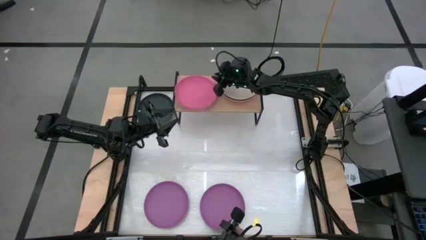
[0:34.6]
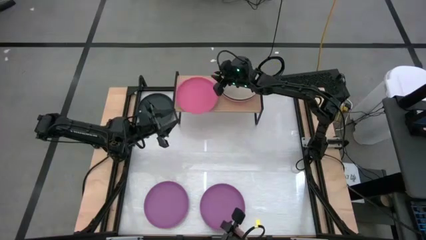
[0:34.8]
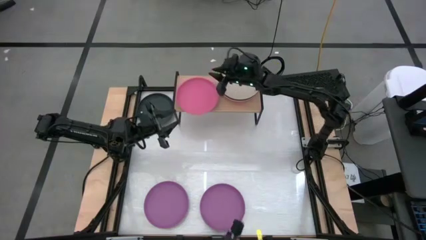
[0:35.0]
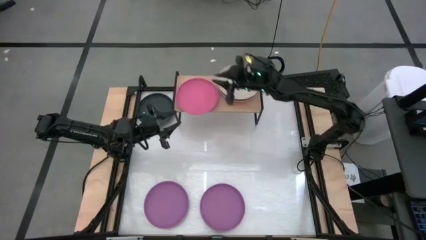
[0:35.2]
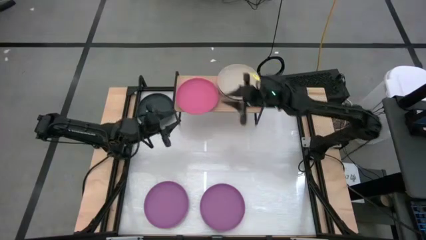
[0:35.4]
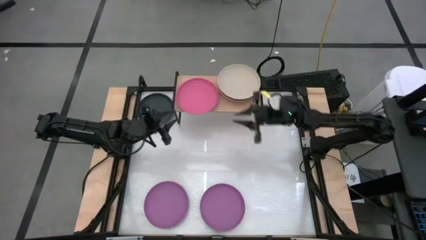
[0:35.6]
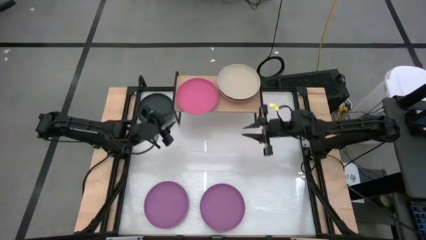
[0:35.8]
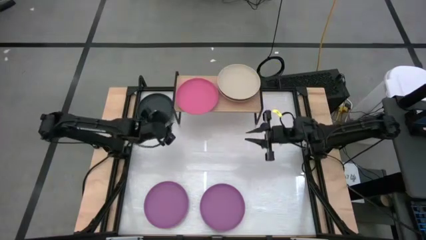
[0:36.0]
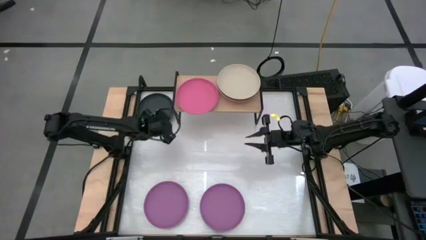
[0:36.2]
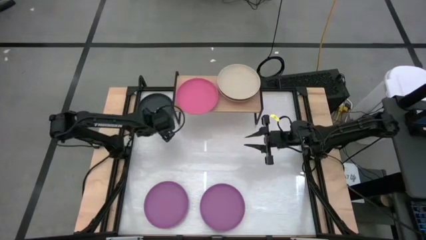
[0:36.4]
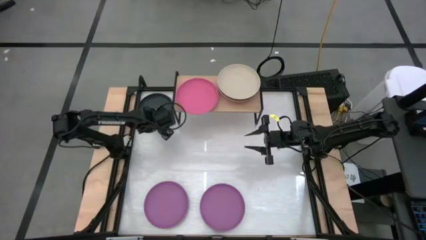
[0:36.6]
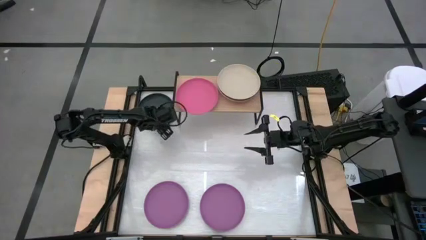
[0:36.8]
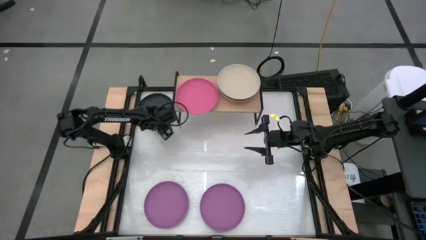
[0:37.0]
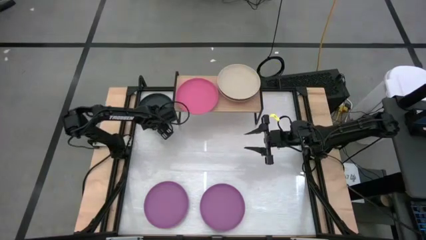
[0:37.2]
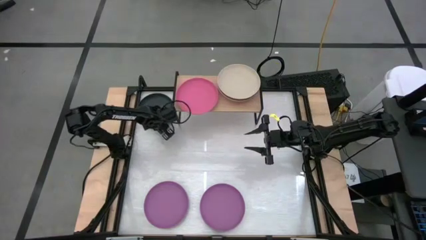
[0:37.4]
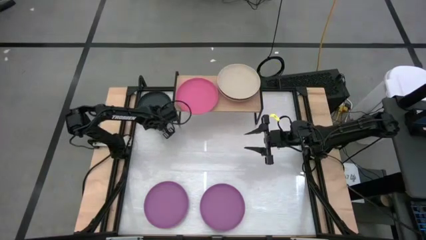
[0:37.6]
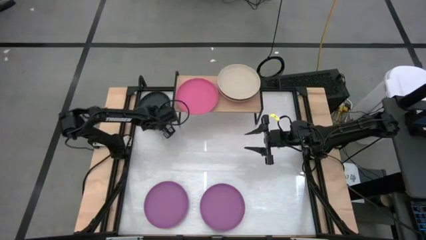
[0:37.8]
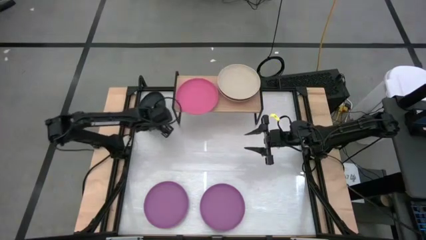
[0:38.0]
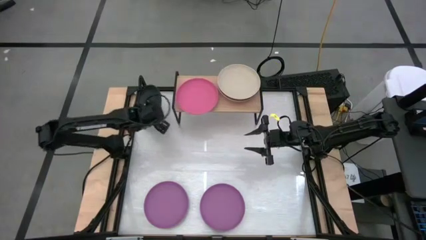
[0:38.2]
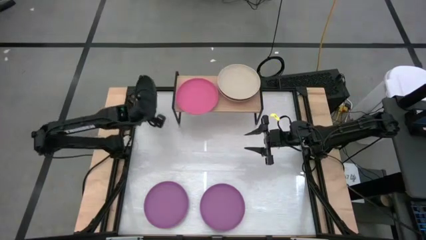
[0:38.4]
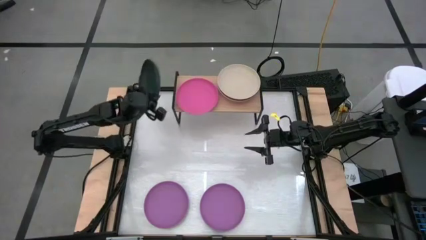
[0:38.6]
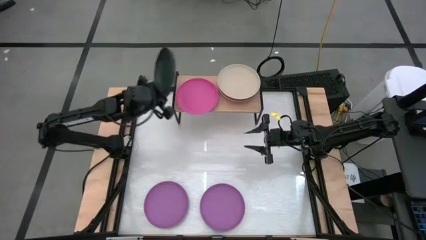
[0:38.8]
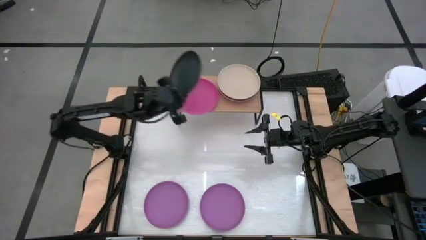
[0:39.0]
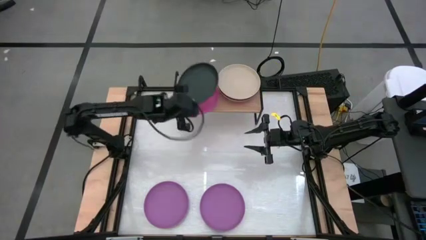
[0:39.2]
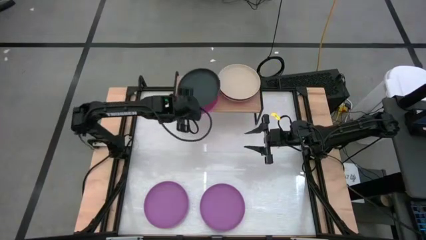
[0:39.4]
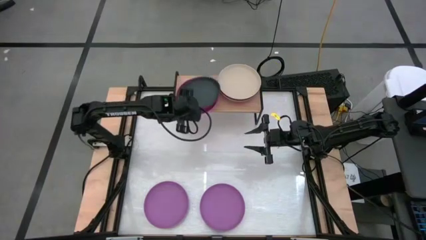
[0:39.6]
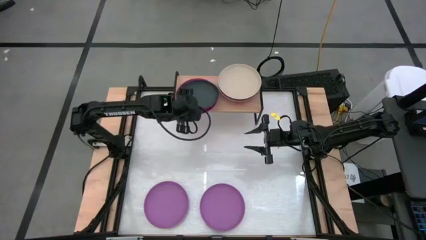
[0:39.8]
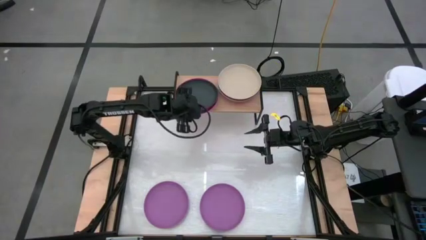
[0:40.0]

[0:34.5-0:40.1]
Task: Place and stack plates onto a shelf
Stack the black plate on top of the pink plate on the shelf

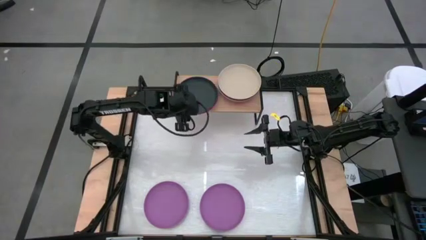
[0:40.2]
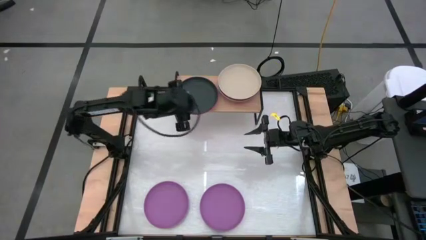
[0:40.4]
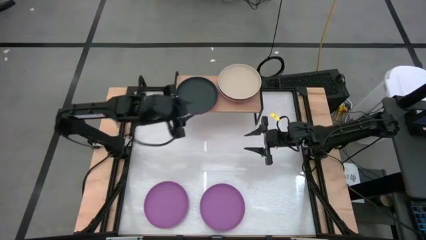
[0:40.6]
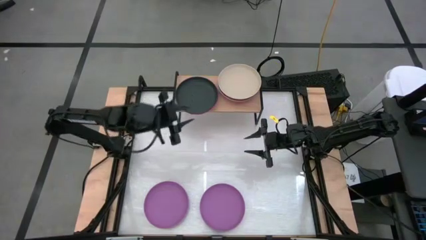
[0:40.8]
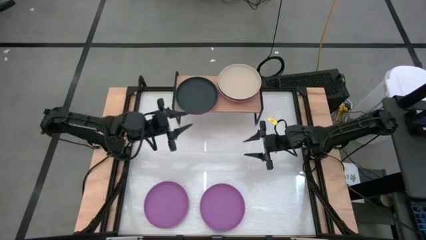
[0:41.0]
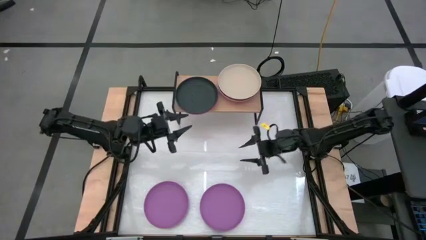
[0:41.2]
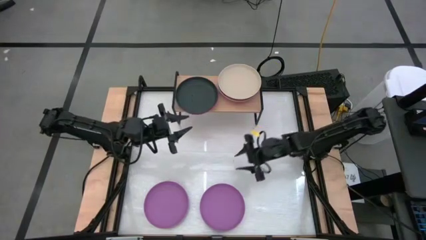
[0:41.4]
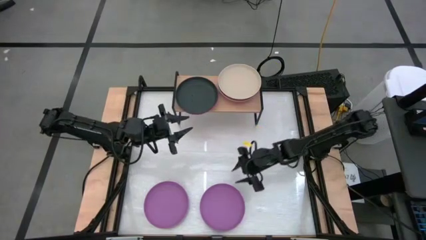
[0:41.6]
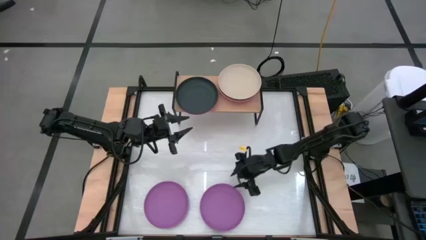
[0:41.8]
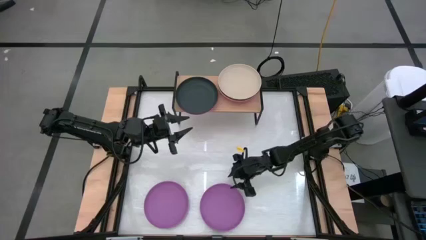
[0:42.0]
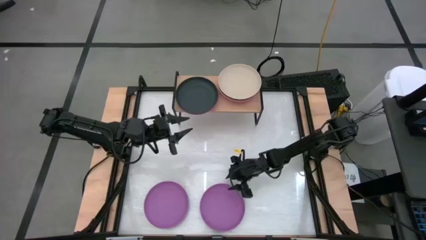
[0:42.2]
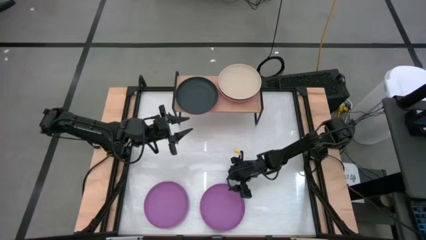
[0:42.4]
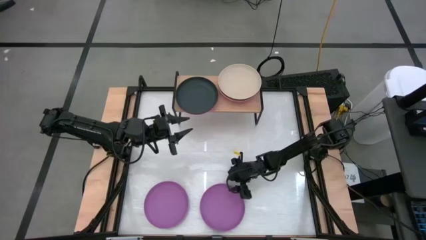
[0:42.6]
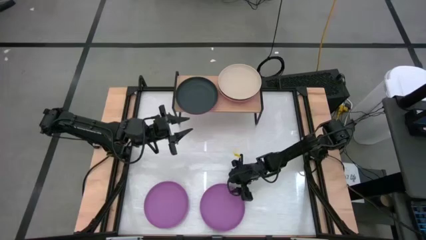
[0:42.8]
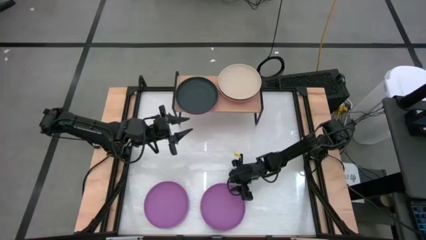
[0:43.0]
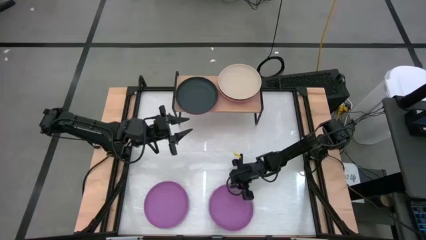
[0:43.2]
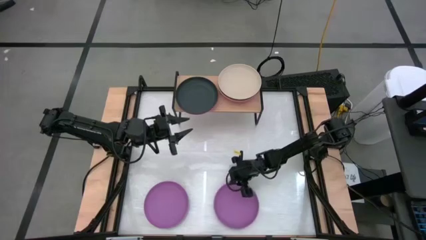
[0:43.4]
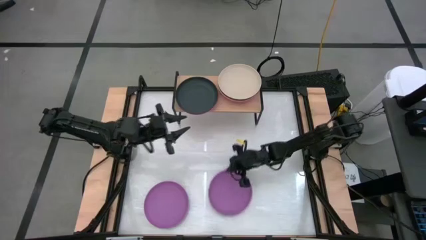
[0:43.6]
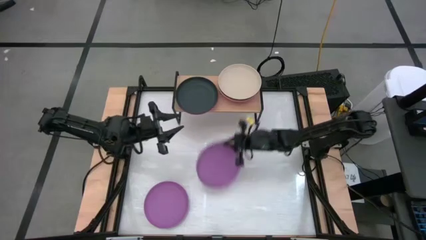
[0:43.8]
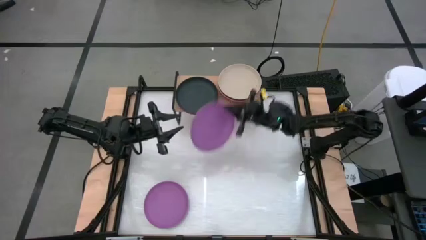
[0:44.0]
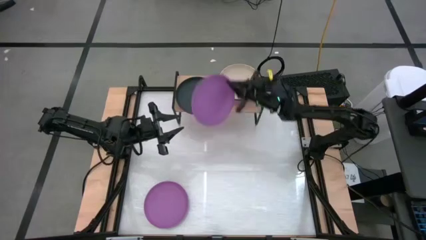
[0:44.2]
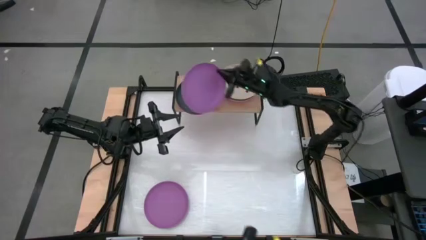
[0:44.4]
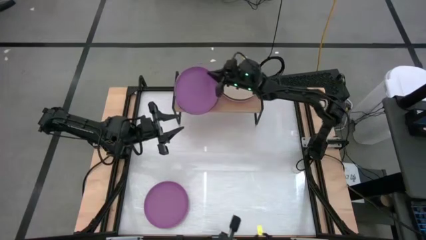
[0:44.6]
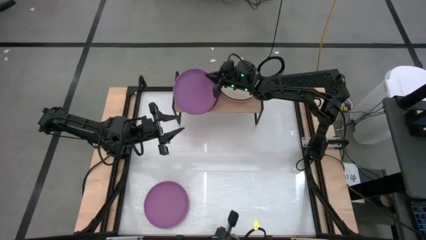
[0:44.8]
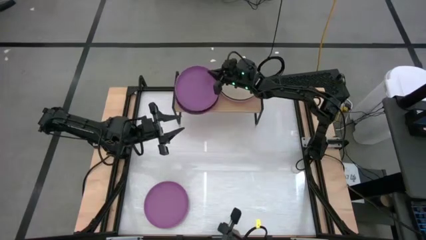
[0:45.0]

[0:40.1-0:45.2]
Stack the right violet plate on top of the black plate on the shelf

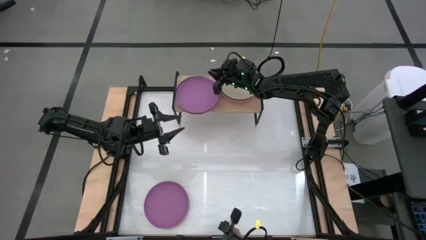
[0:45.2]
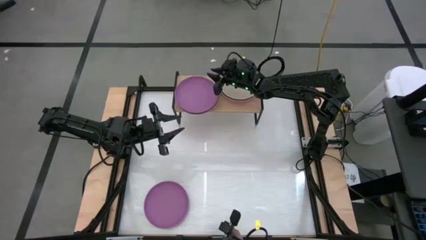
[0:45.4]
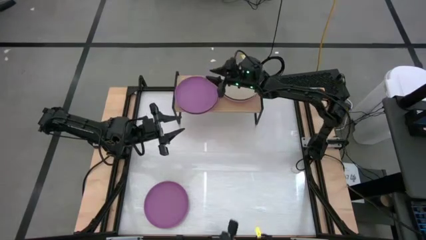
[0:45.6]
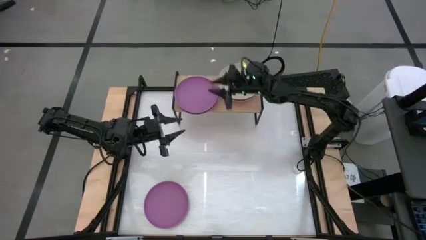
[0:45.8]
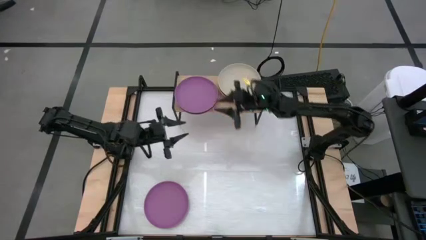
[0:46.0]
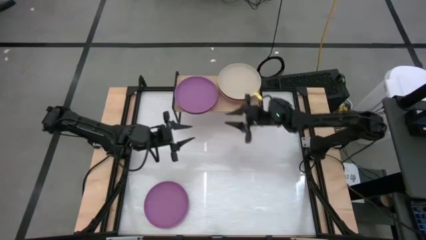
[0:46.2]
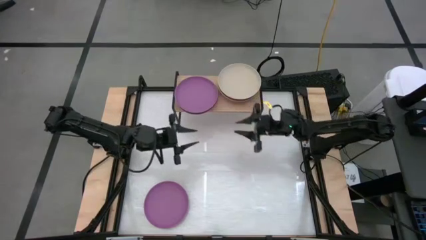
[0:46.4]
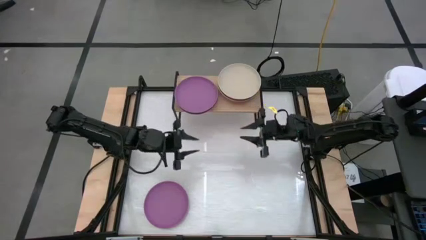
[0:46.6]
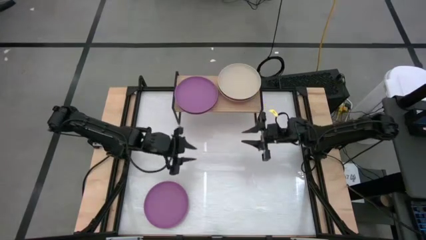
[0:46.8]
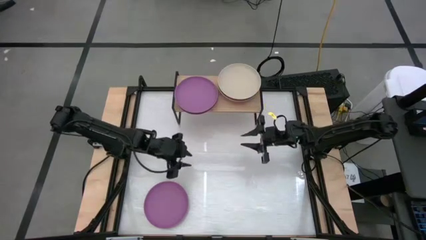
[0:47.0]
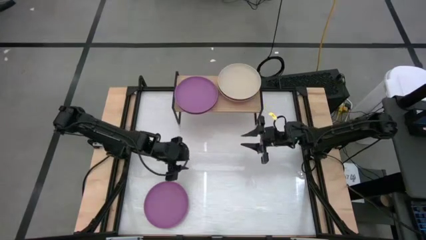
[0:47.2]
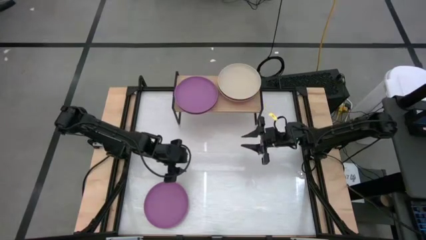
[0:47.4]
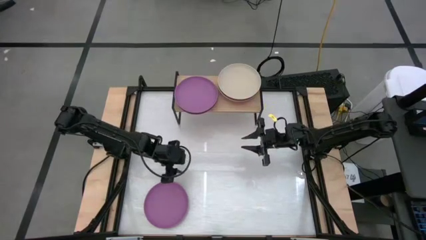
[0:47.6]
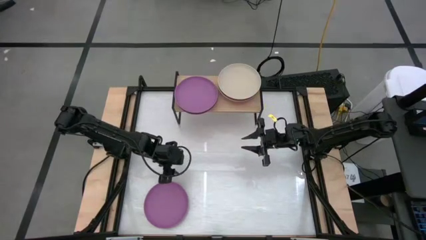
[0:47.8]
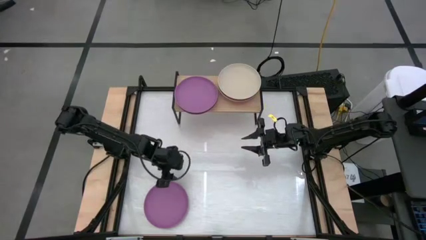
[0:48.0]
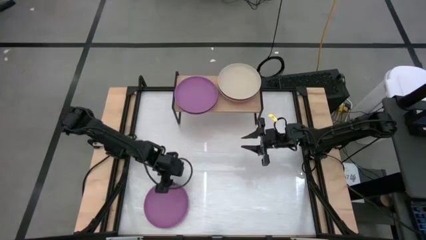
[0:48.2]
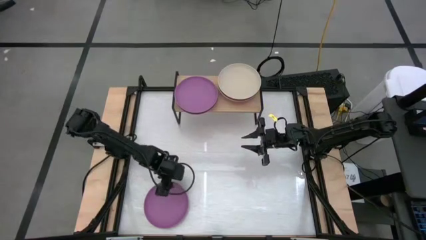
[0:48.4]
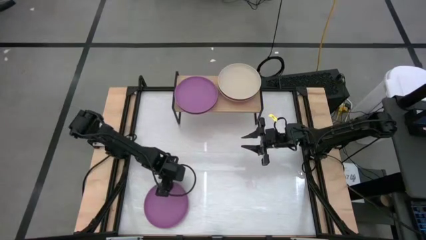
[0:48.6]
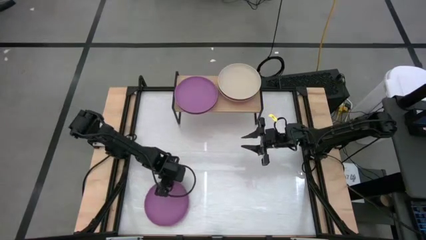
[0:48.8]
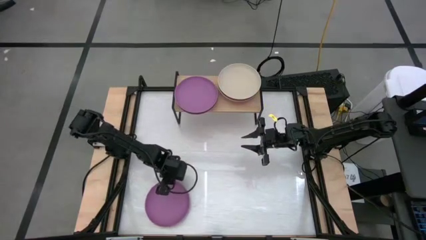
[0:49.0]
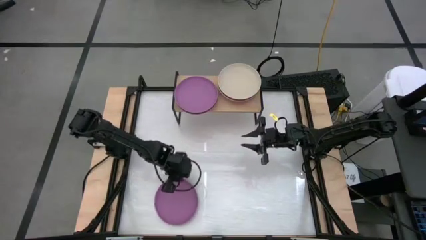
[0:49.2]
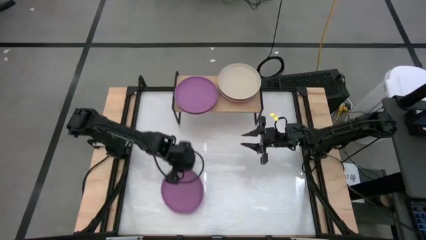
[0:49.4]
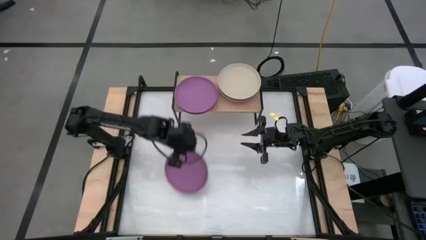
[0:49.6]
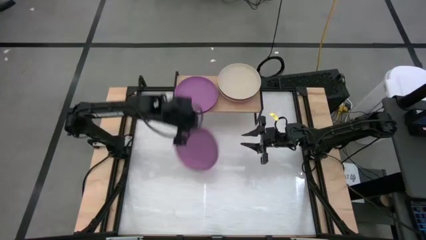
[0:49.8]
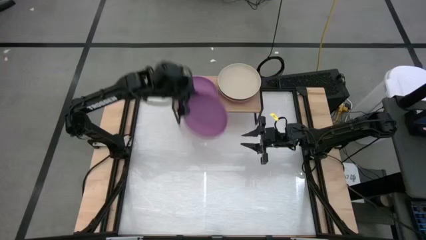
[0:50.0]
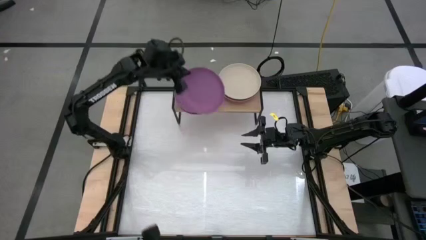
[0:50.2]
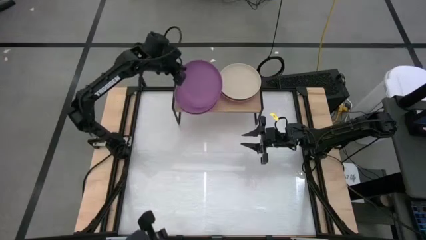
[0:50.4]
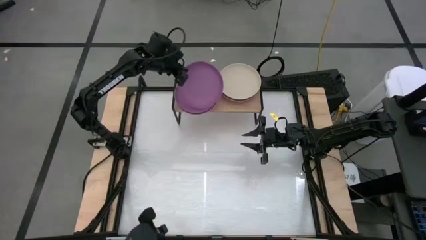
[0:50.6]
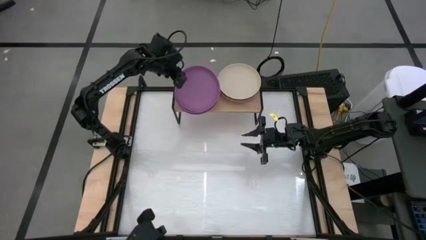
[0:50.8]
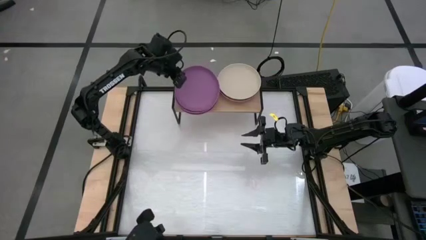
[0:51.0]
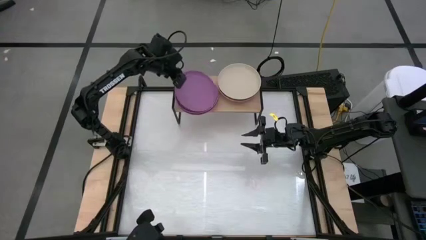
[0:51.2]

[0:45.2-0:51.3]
Stack the violet plate on top of the violet plate on the shelf
